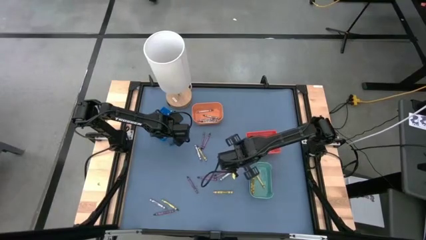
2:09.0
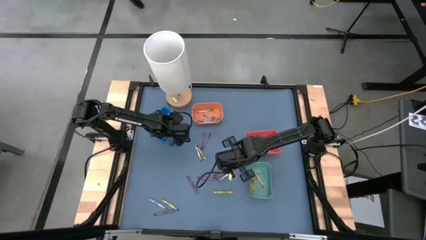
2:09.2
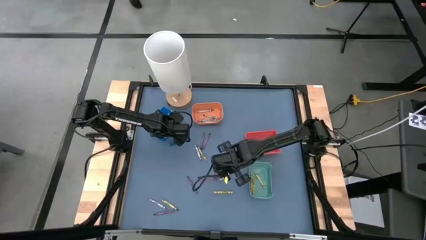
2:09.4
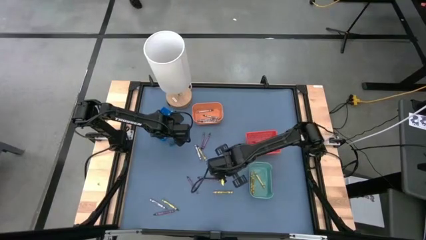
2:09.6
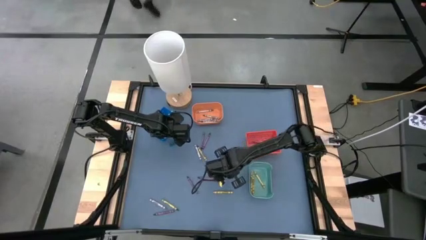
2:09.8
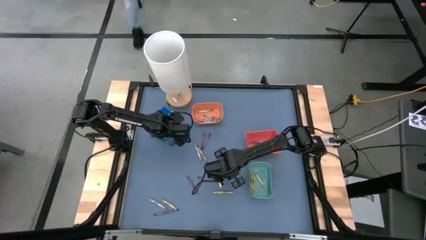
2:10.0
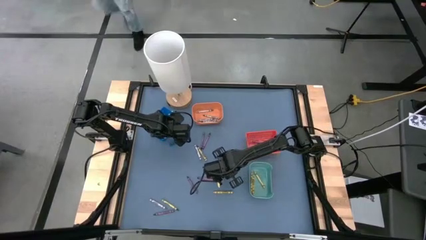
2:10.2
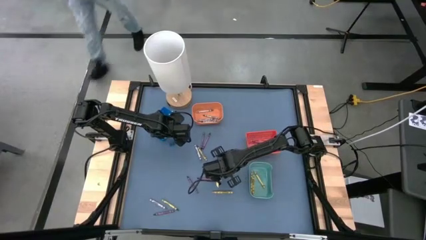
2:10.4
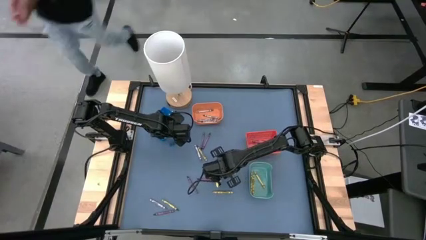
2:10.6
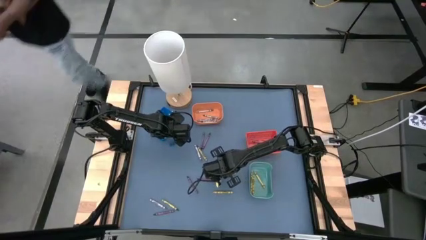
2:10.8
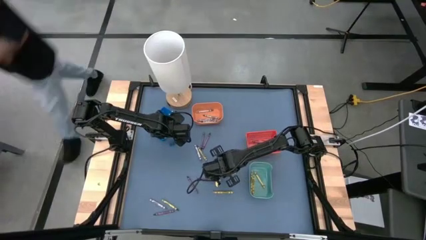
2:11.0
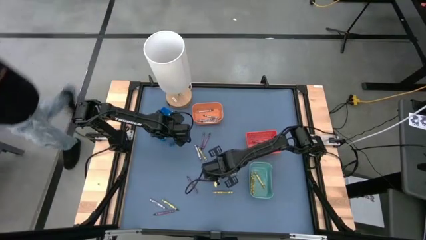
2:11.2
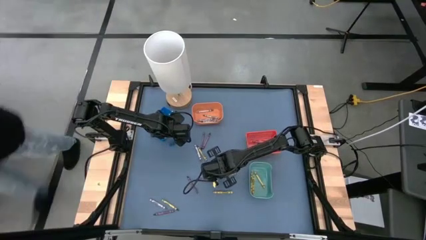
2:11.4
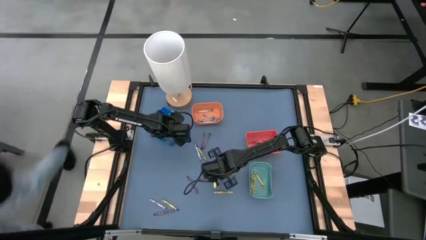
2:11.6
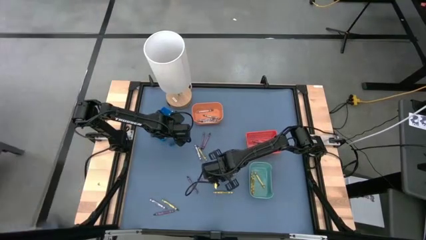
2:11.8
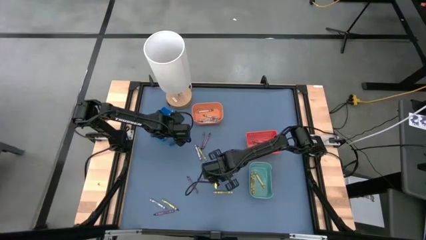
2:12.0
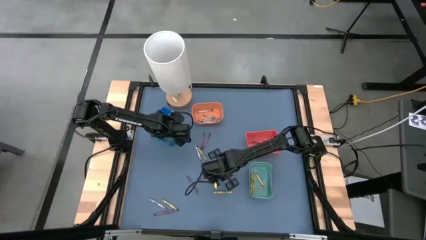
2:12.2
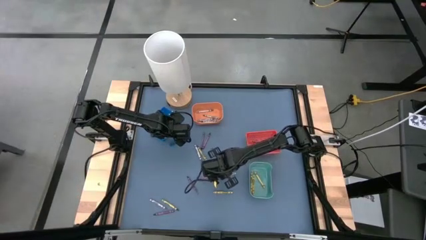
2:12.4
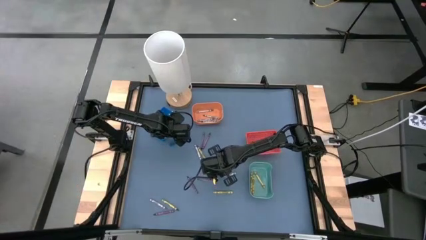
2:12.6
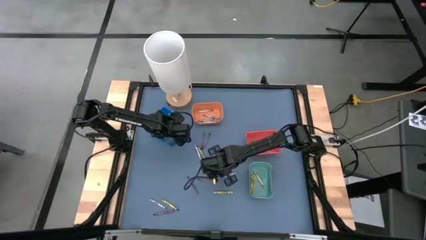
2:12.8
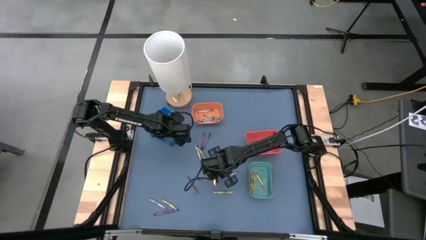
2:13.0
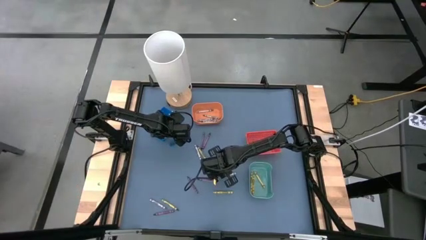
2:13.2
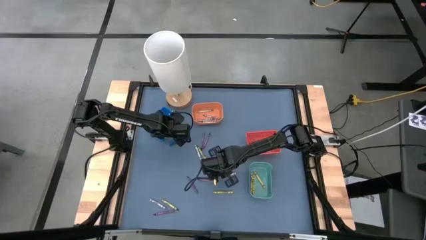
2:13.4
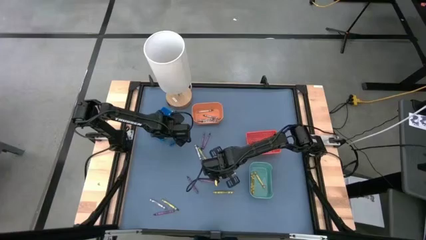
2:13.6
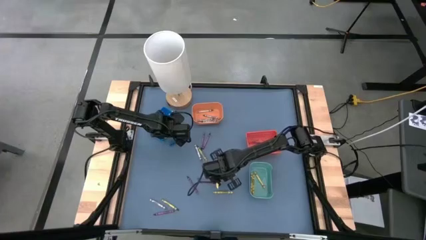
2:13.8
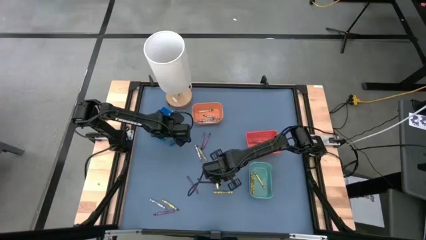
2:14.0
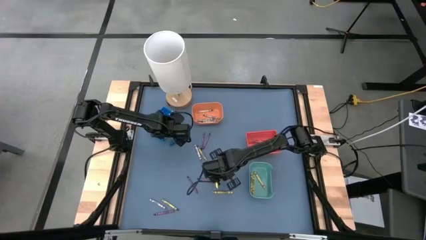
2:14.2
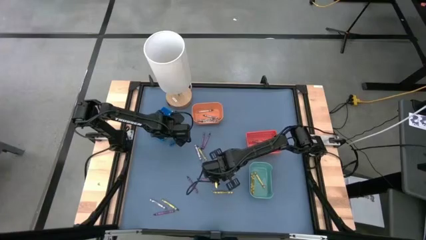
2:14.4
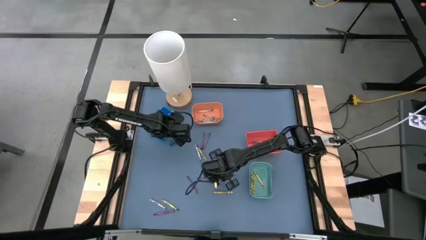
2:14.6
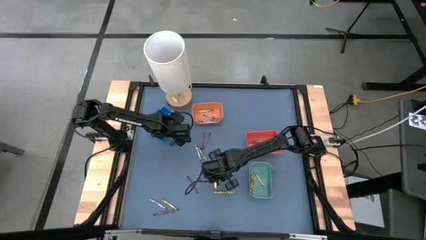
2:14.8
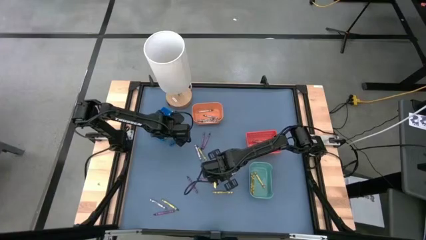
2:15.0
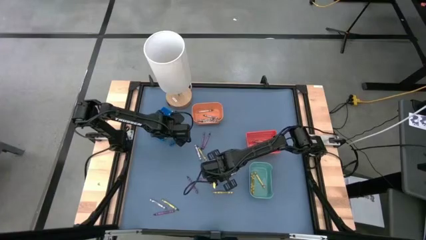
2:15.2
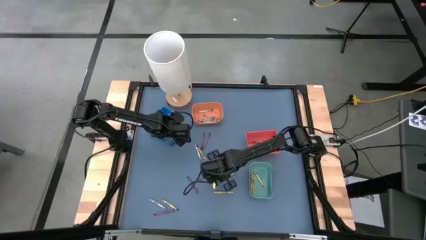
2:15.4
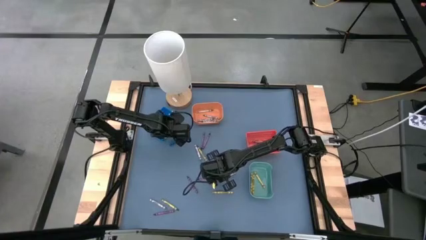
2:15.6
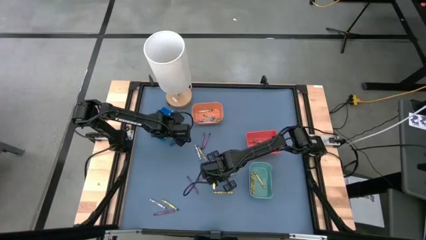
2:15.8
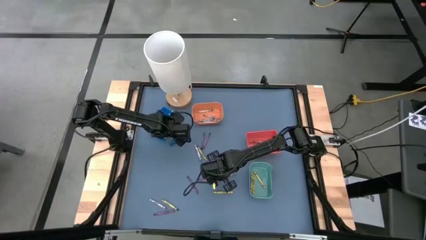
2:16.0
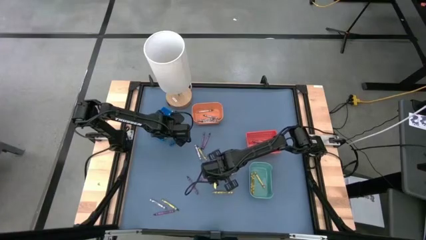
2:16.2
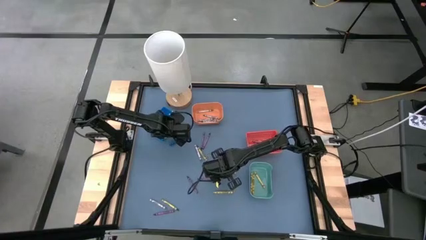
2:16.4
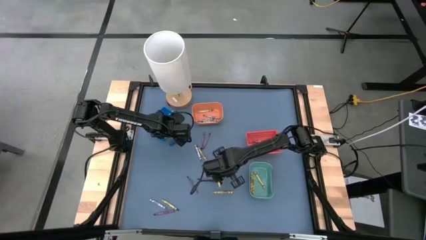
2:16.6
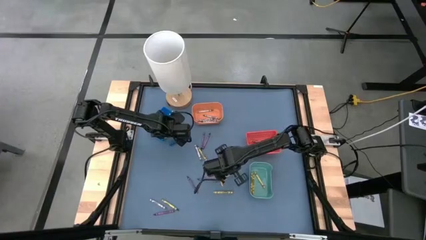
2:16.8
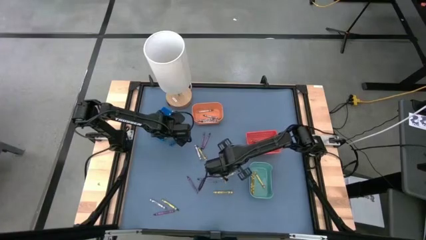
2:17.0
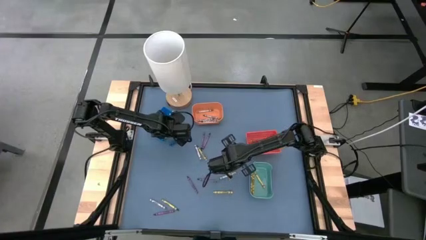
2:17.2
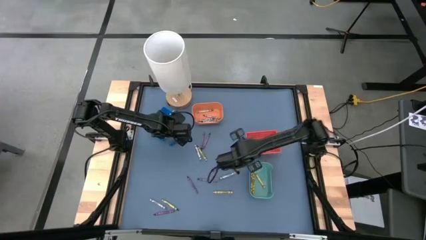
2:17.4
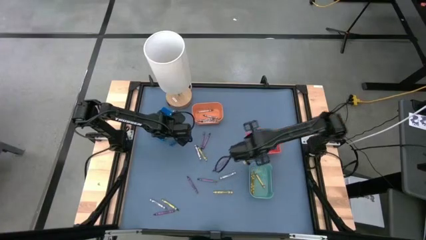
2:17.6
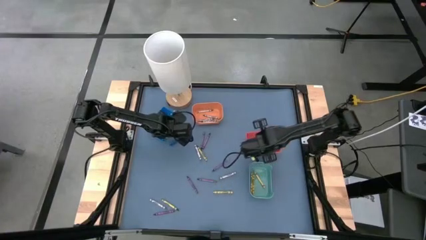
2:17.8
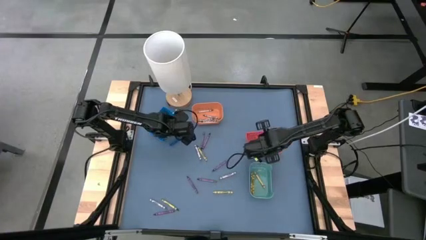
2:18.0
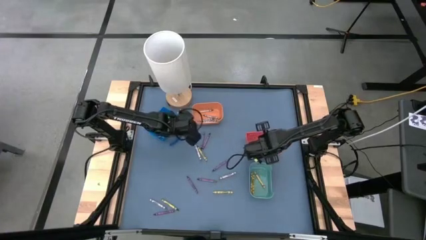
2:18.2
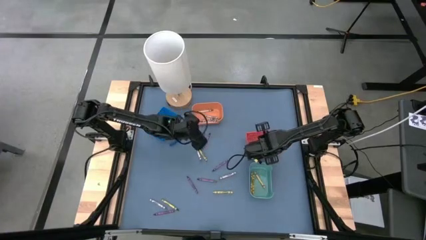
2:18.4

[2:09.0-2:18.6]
Task: Sort crayons
Put the violet crayon into the red bin

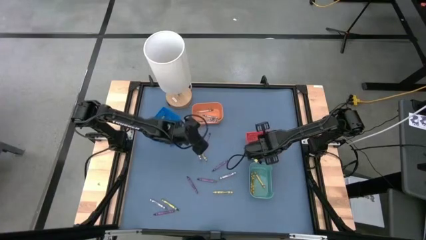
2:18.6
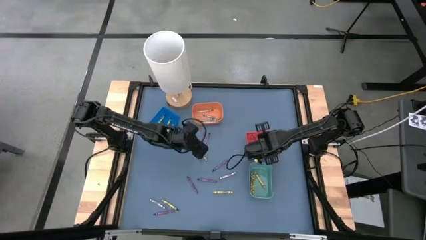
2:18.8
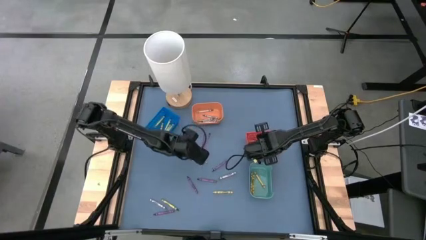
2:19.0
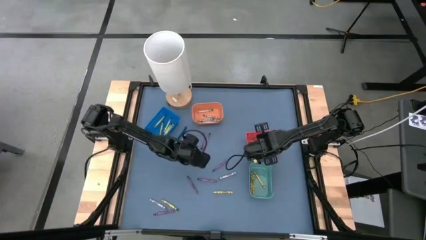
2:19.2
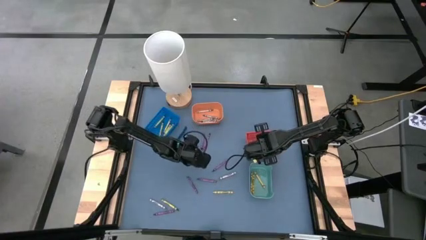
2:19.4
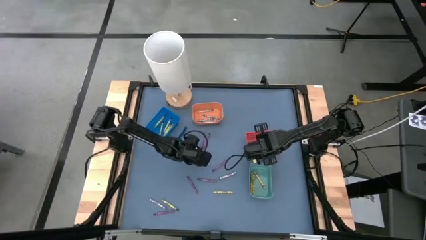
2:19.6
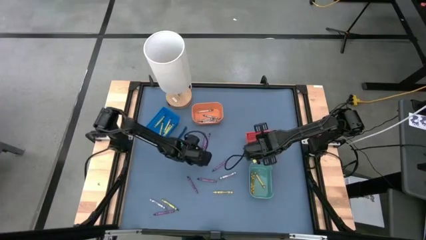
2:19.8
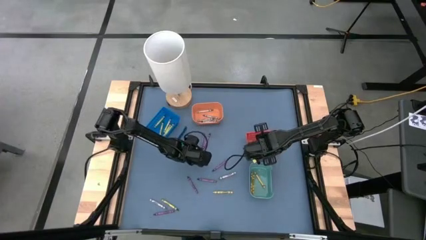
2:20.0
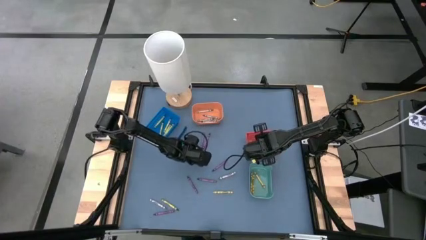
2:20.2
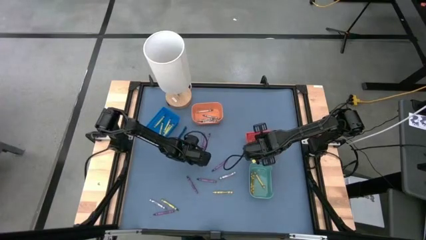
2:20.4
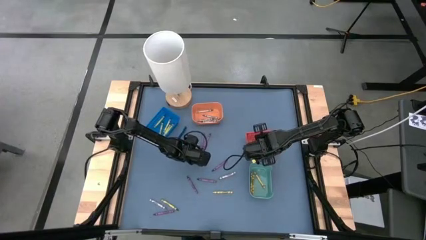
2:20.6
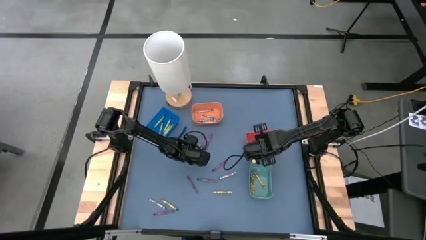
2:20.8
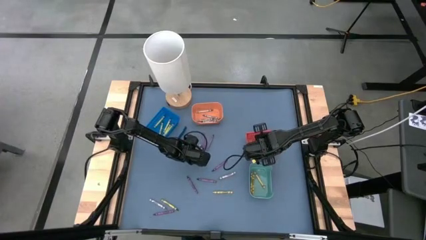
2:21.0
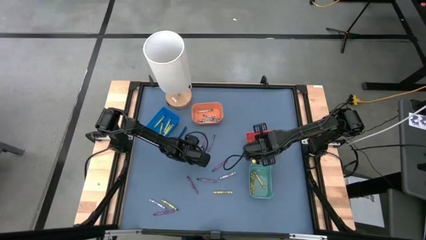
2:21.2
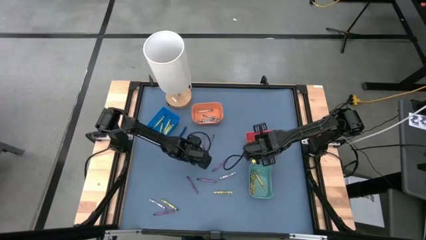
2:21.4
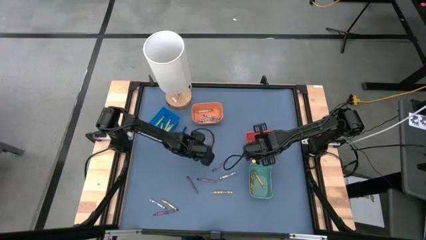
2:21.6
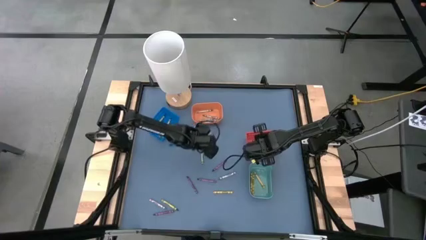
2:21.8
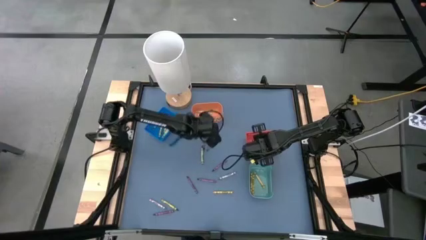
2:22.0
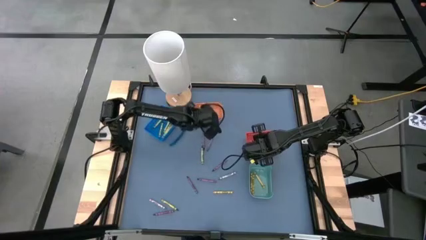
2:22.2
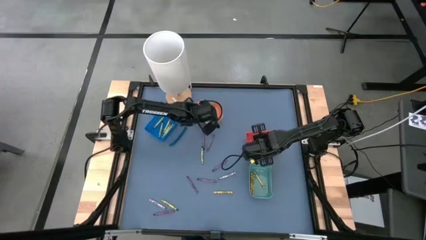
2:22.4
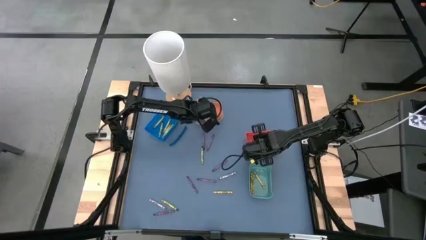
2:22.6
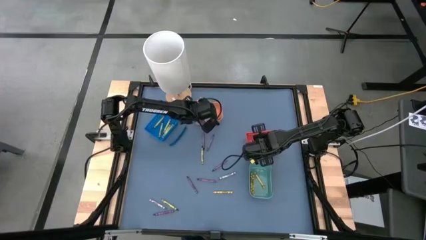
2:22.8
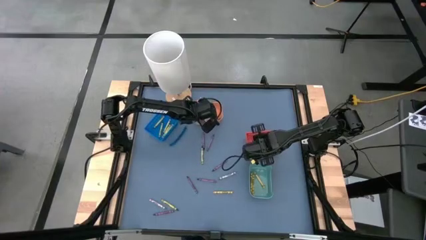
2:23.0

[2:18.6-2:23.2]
Put the gray crayon into the orange bin
